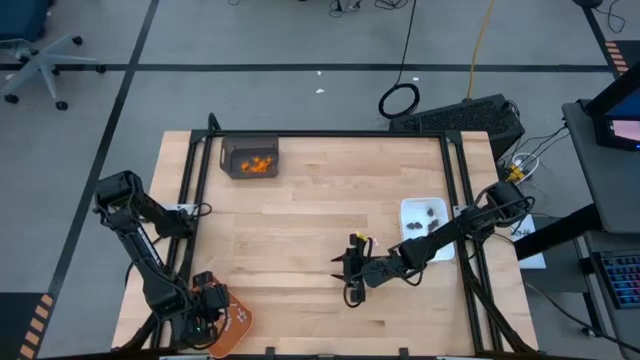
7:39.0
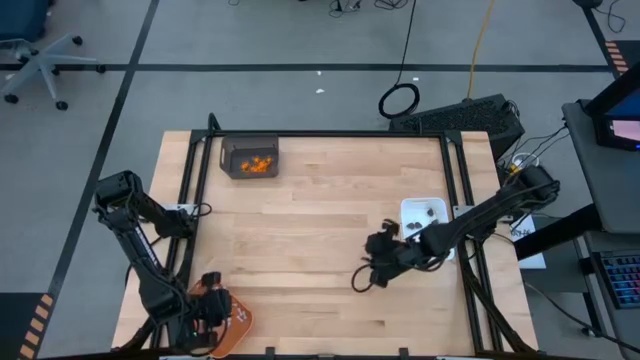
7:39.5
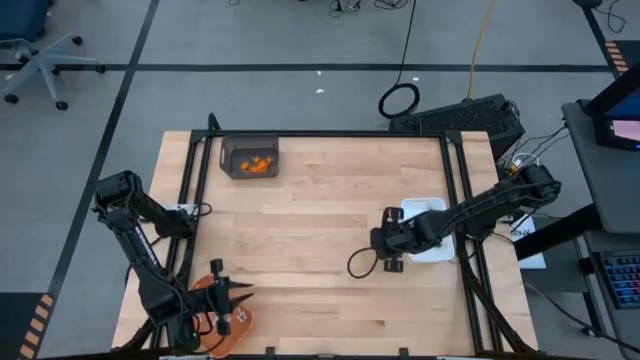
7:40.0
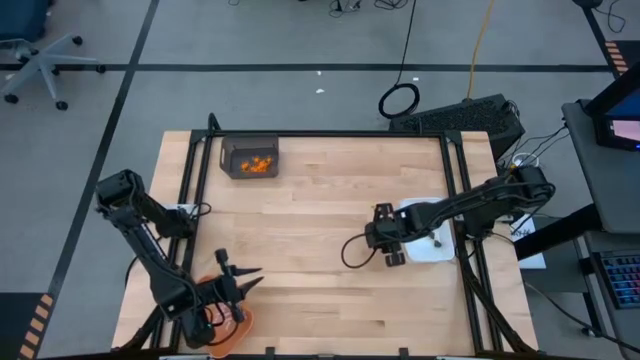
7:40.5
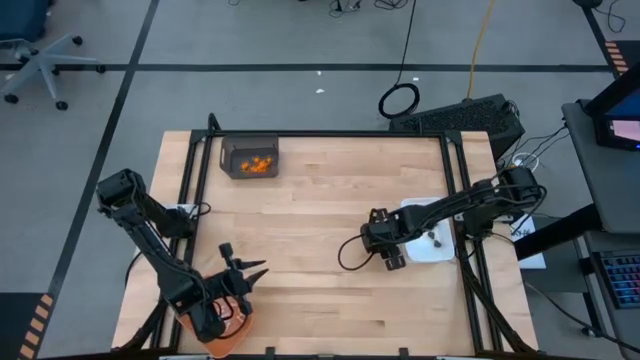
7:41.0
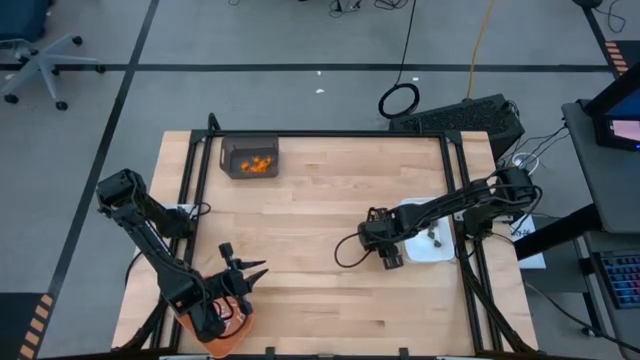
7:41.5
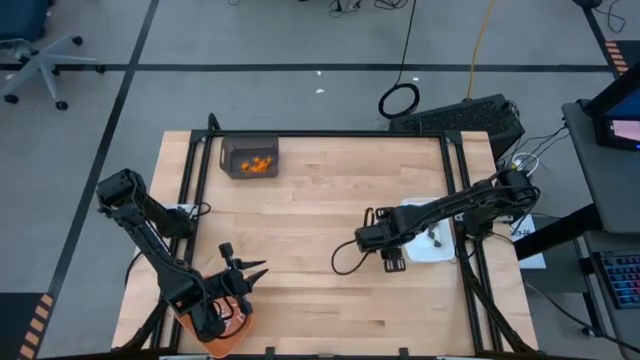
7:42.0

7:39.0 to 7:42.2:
Task: Sort Halloween decoration
Put the white bone toy into the orange bin

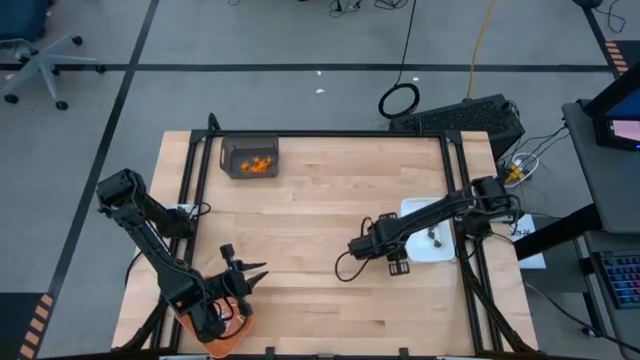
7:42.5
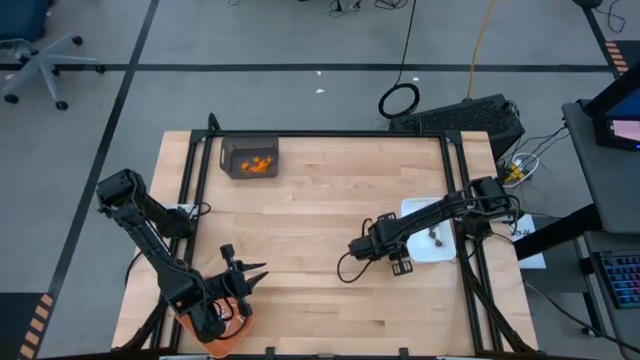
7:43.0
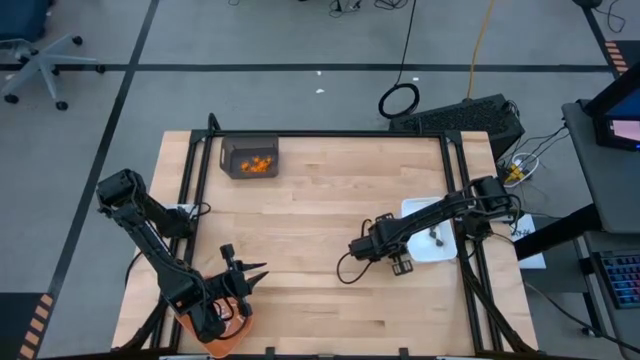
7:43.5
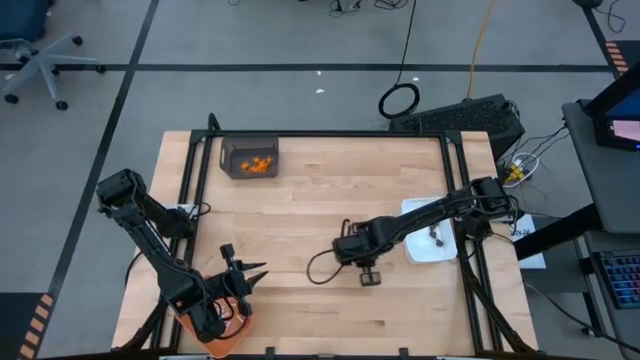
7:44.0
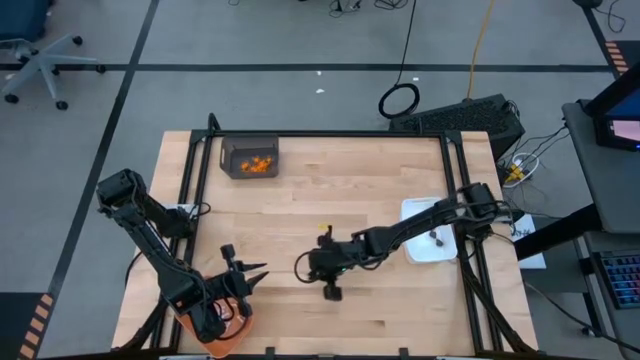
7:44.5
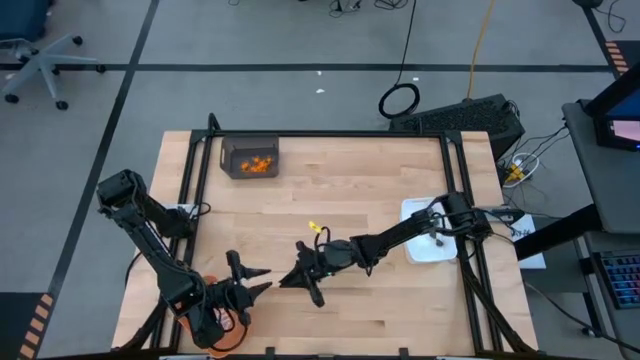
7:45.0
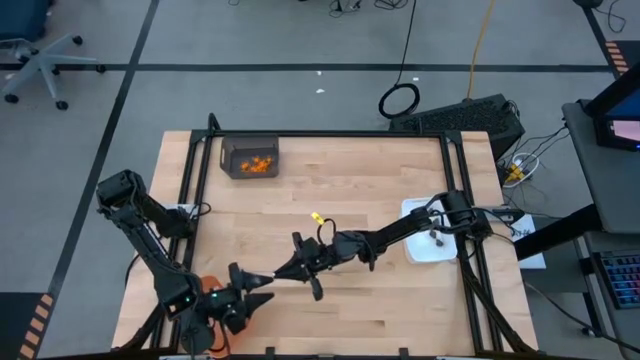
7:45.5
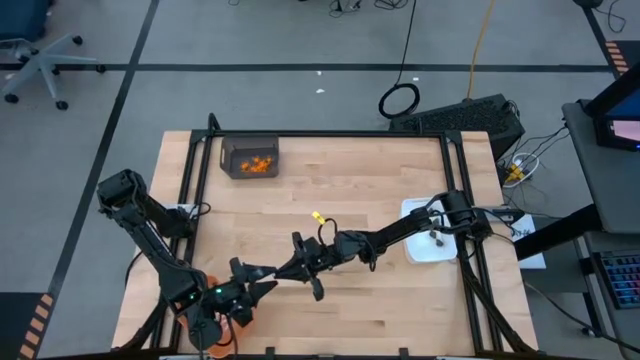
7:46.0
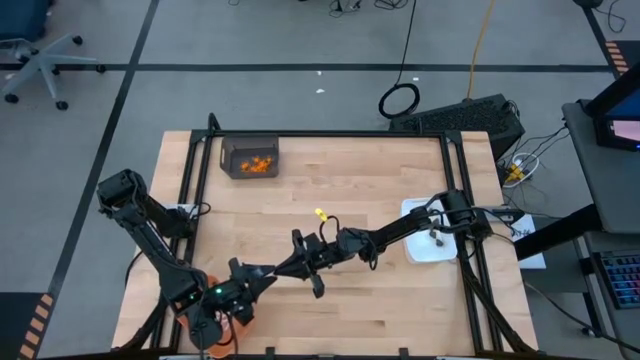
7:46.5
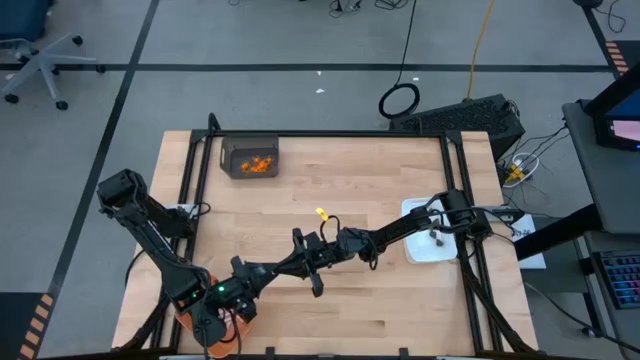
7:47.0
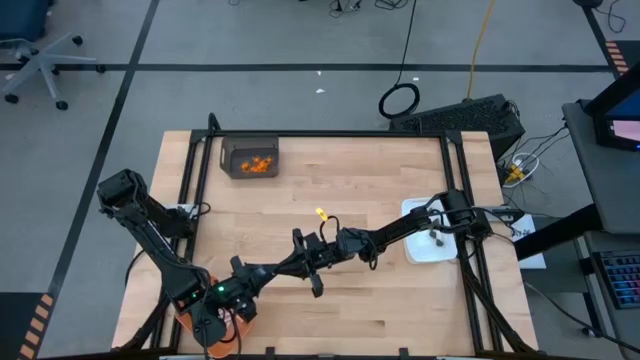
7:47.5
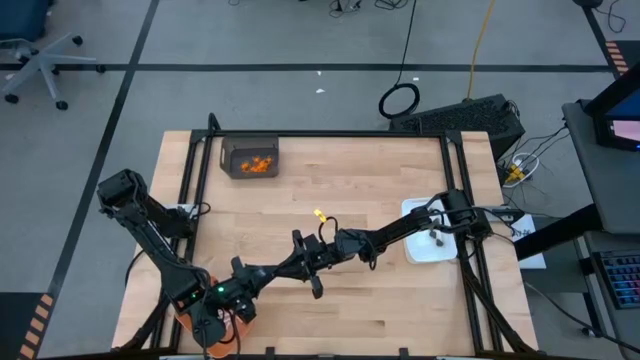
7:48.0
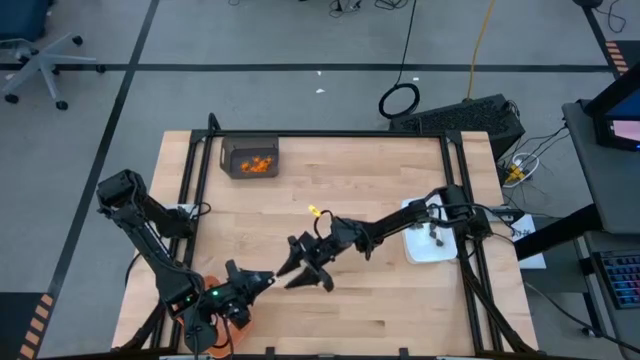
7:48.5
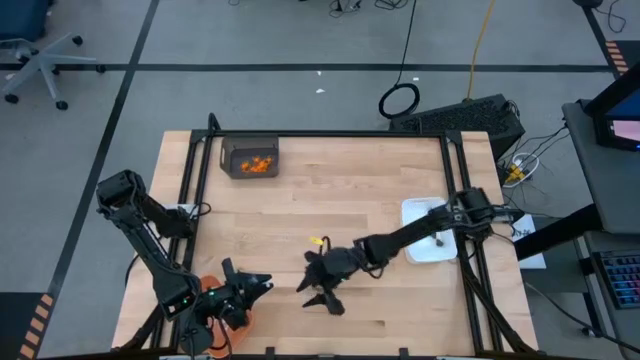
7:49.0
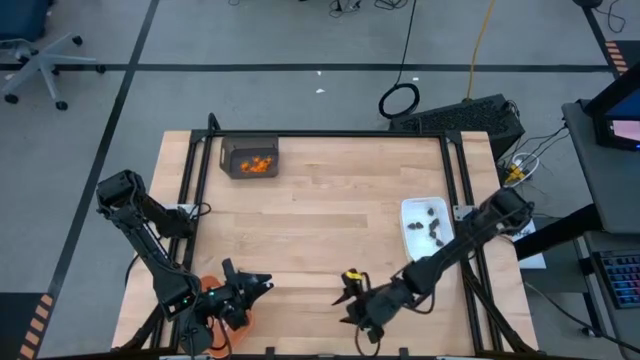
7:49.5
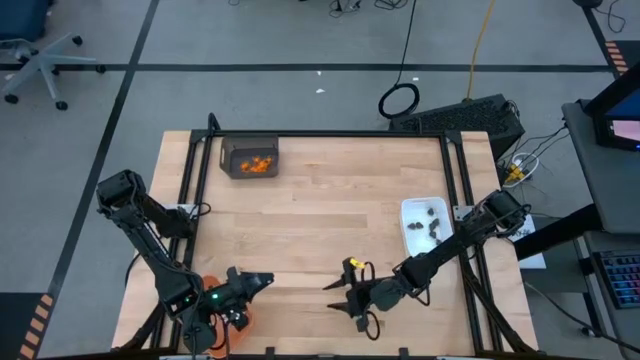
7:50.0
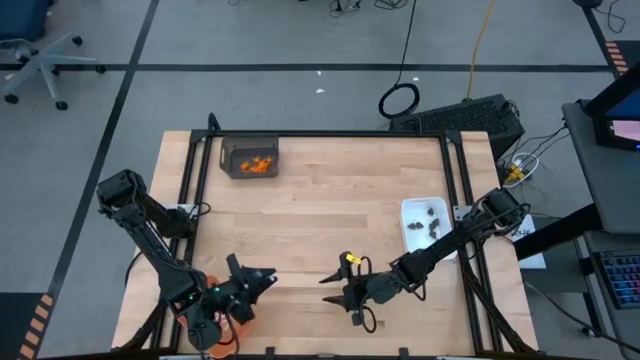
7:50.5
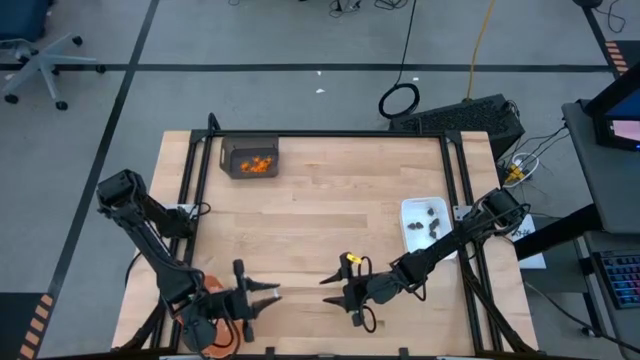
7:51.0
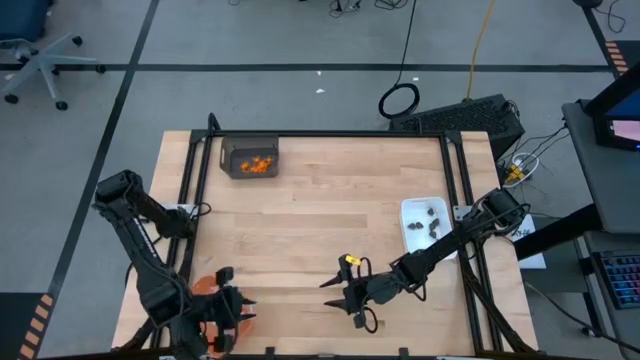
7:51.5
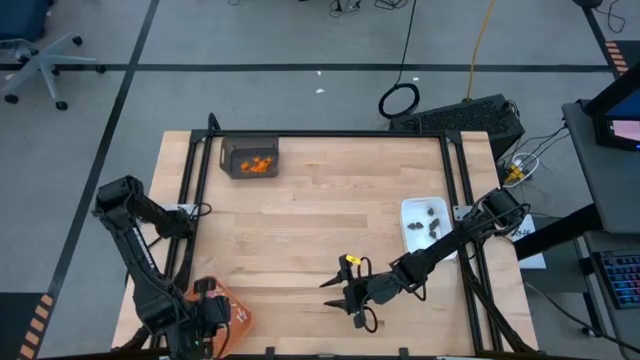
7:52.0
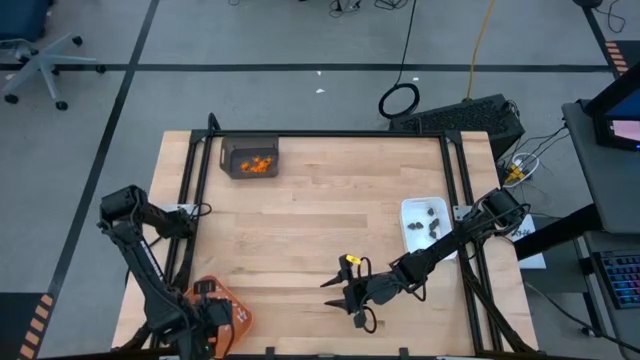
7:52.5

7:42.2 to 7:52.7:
Put the white bone toy into the orange bin

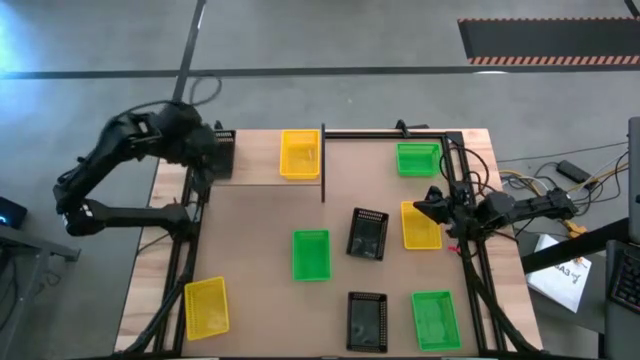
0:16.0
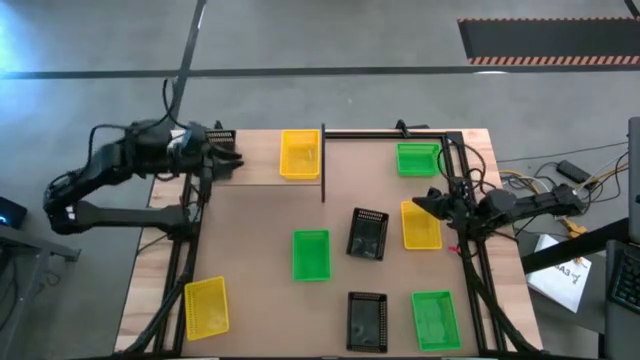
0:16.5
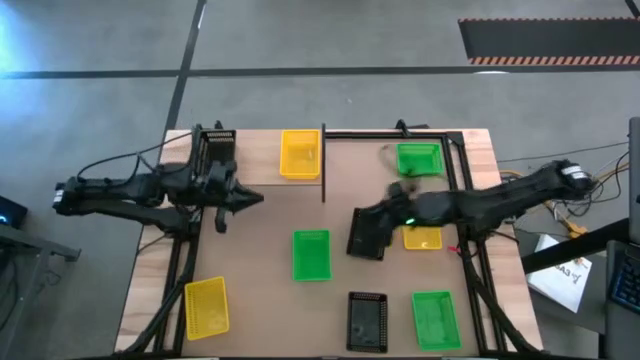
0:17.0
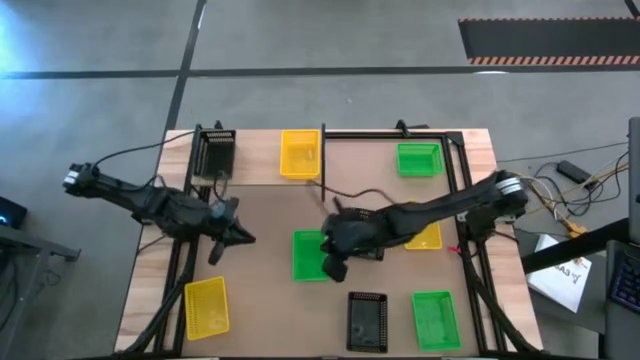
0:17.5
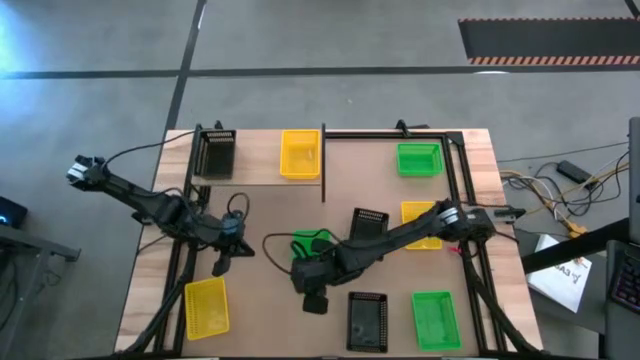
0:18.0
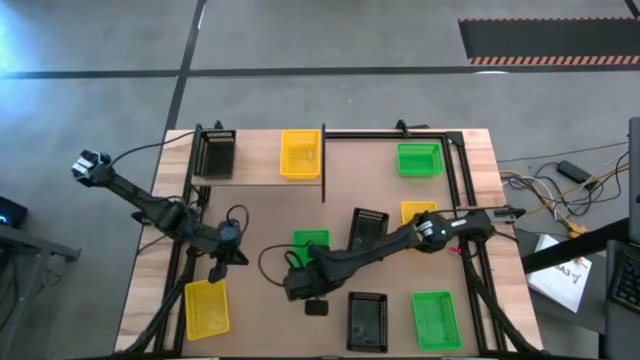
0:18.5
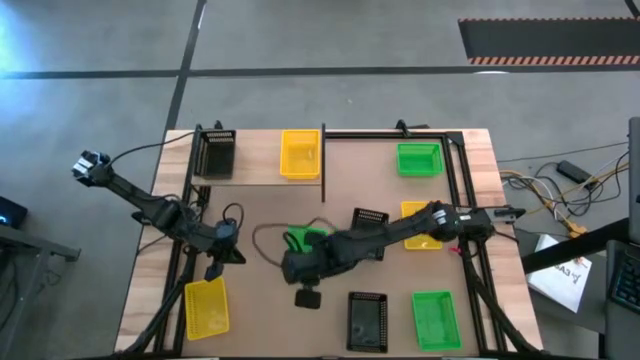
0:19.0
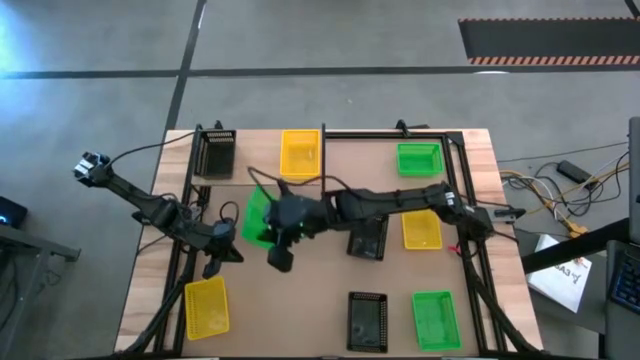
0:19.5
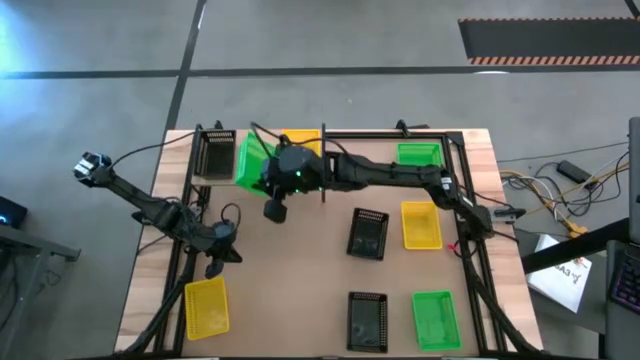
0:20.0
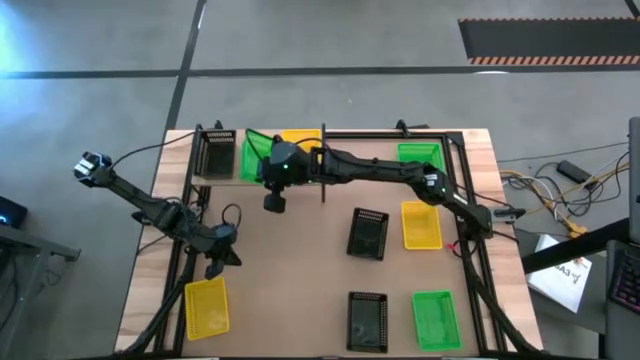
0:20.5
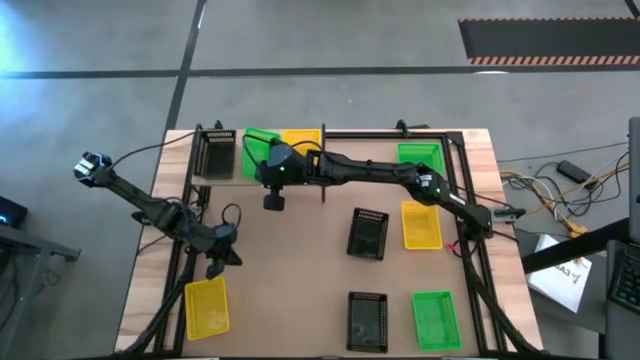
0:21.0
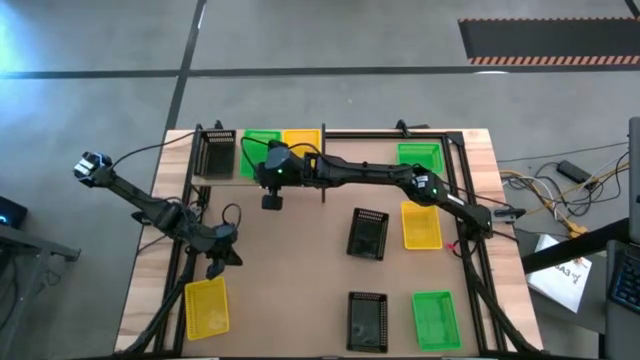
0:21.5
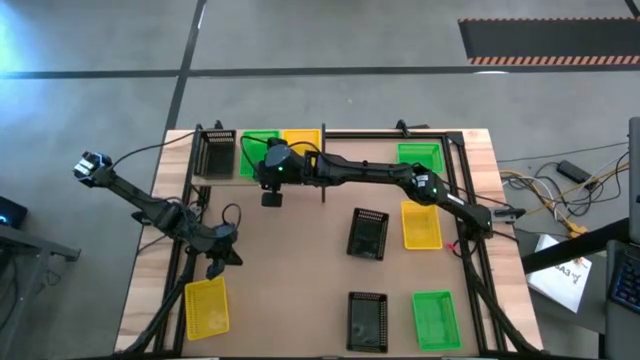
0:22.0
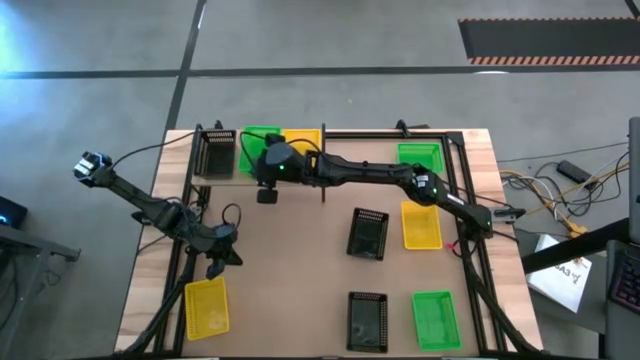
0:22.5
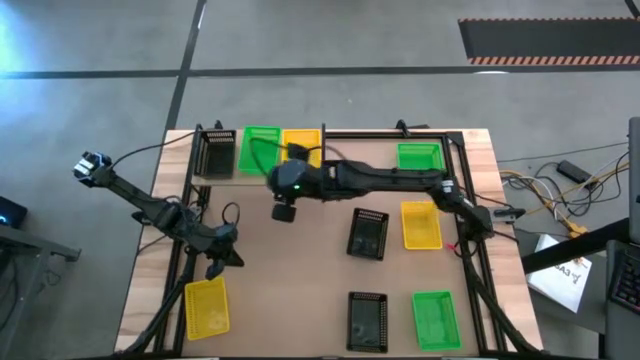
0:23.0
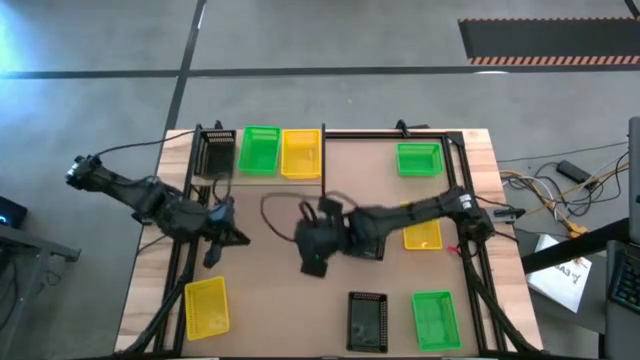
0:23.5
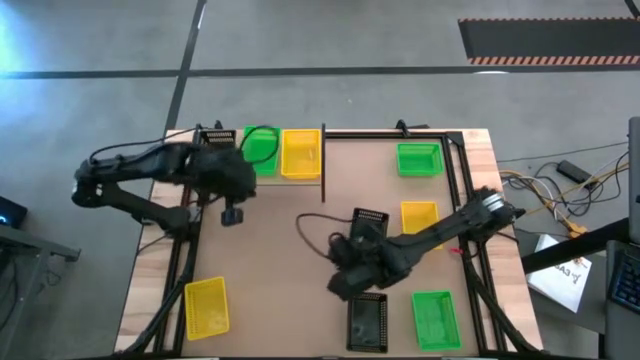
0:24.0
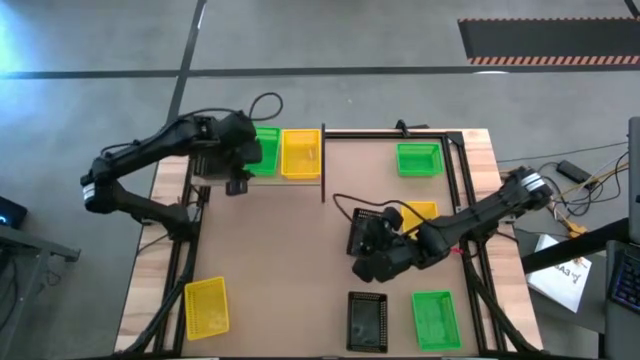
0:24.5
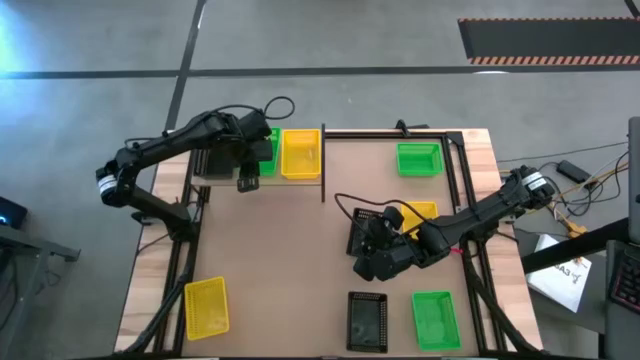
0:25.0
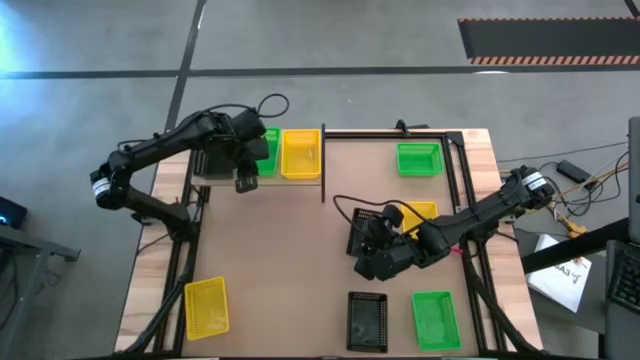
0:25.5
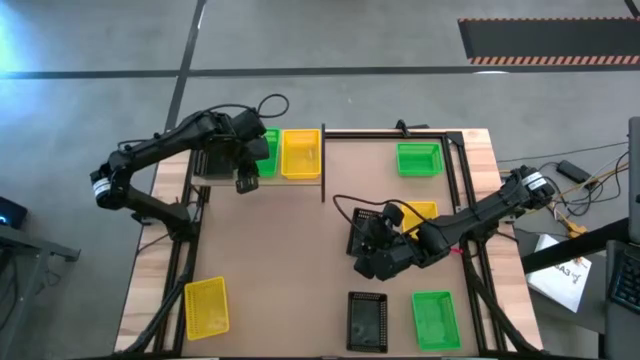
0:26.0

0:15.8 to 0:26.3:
Task: Stack baskets on shelf by color
Put the middle left green bin on the shelf
